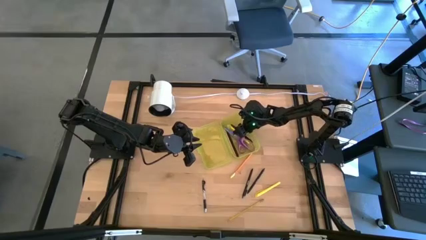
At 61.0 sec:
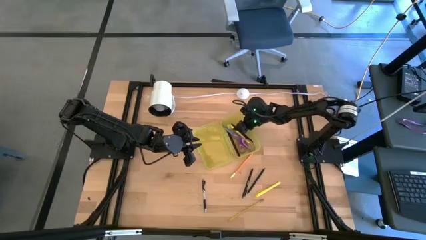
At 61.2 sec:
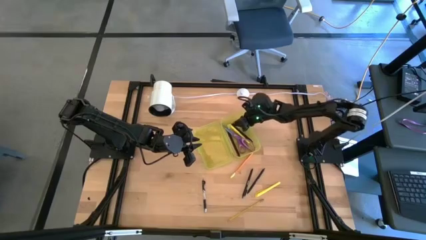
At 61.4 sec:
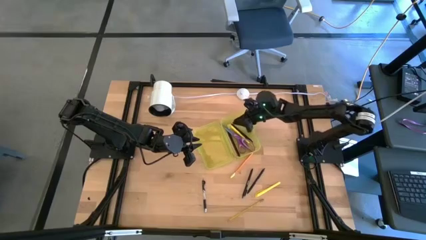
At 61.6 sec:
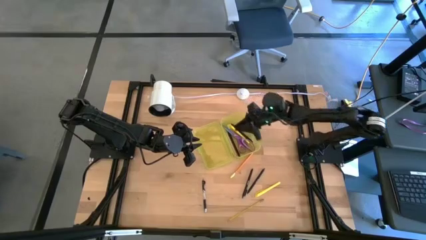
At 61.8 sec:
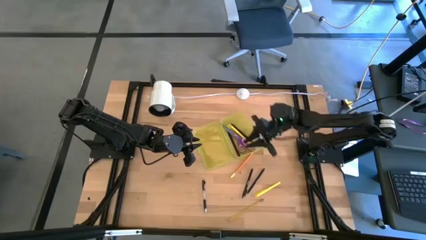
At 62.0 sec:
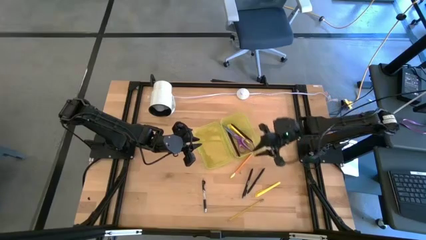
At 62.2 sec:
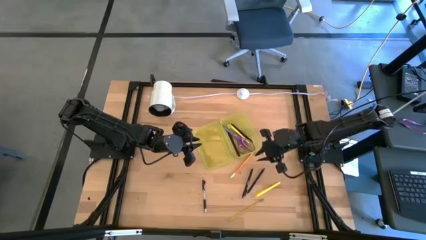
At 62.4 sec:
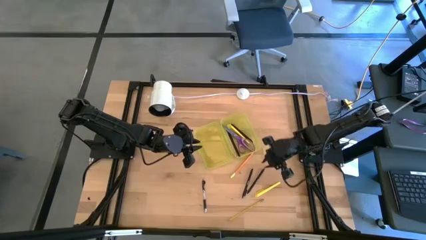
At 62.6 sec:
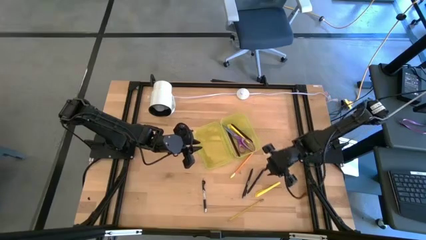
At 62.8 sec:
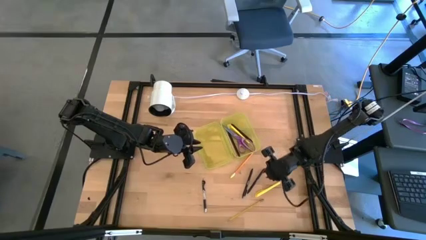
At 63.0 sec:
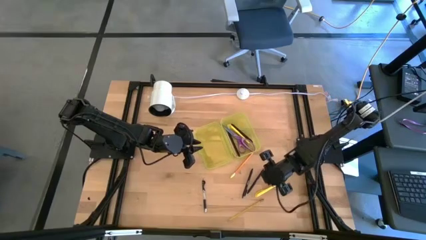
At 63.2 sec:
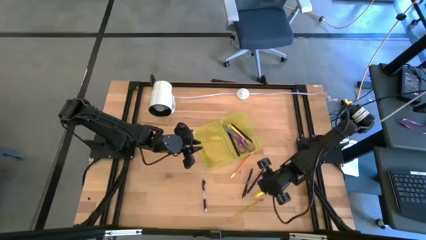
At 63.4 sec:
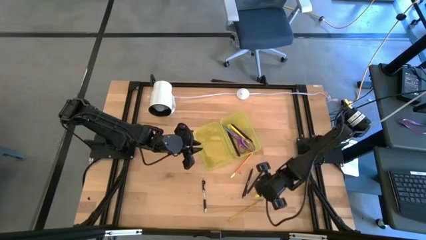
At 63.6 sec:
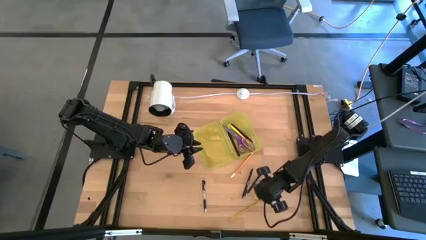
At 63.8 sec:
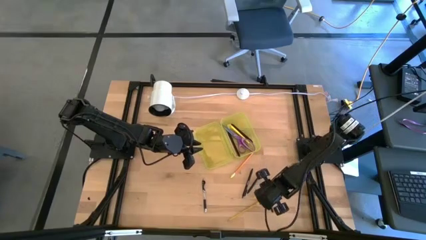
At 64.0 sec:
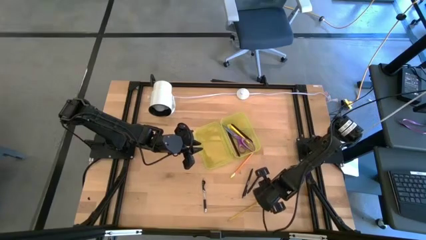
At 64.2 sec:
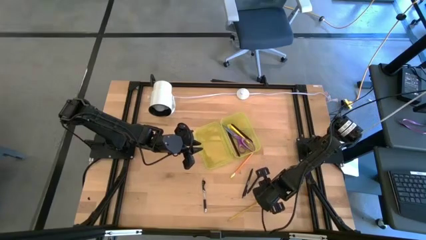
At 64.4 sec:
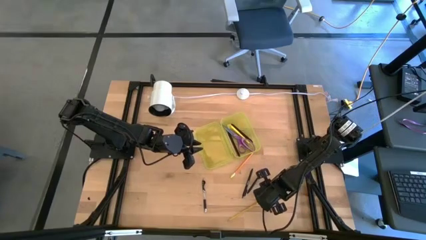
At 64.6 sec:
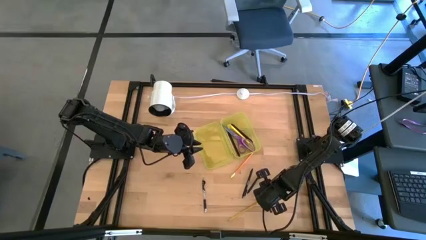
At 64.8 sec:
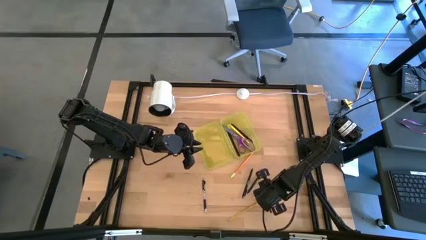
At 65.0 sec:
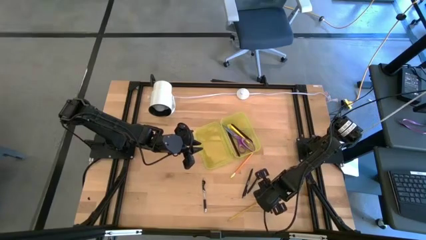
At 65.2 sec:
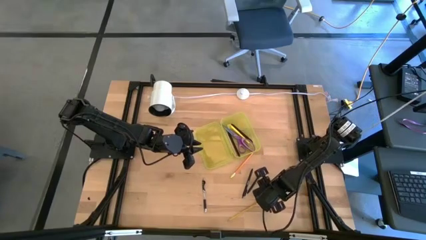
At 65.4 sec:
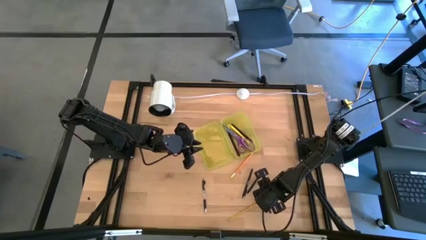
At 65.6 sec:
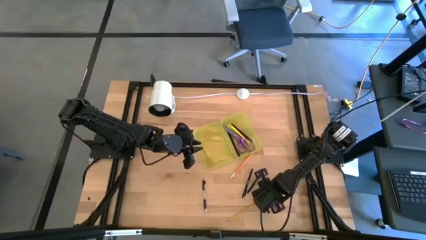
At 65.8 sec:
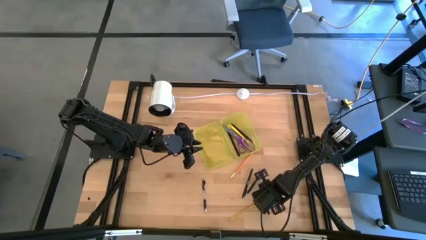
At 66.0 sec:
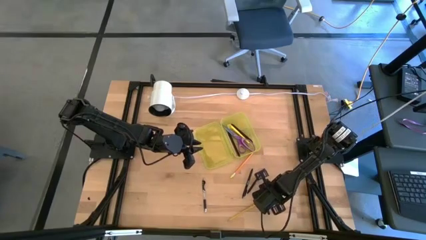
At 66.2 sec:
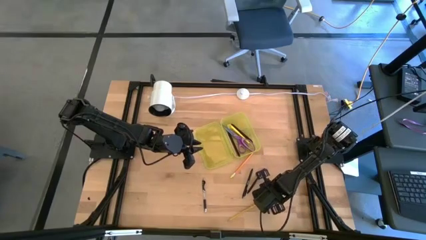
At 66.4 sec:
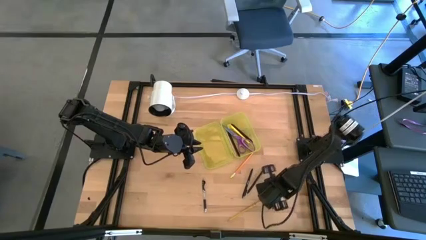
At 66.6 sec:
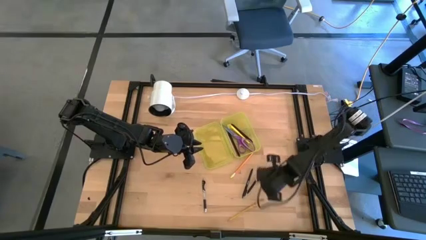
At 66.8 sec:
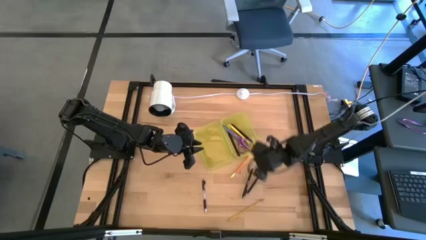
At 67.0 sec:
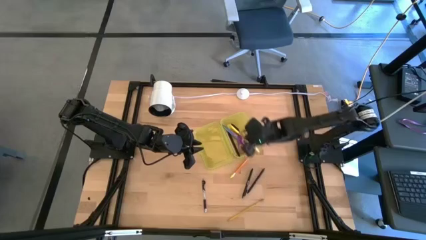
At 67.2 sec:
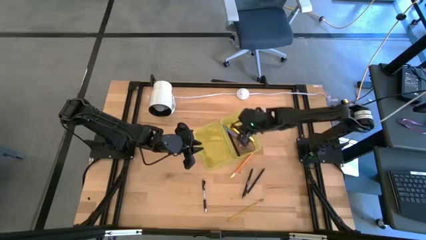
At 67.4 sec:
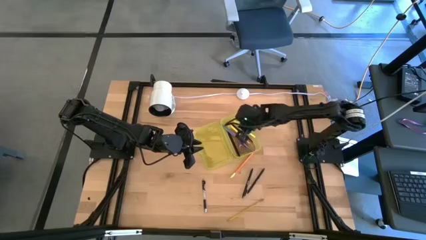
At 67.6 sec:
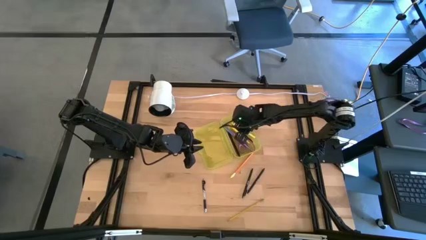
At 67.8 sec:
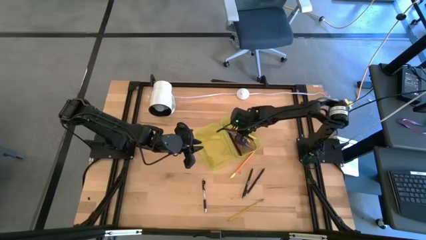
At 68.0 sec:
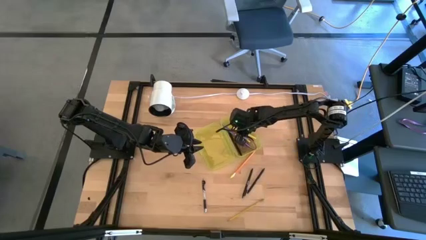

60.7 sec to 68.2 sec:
Task: Pick & place school supplies into a supply box
Put the yellow pen into the yellow supply box

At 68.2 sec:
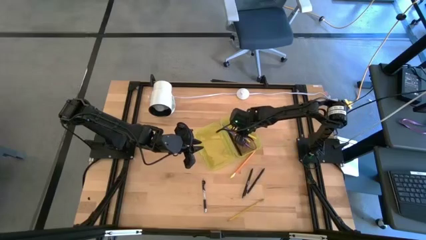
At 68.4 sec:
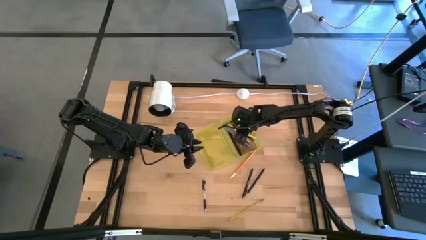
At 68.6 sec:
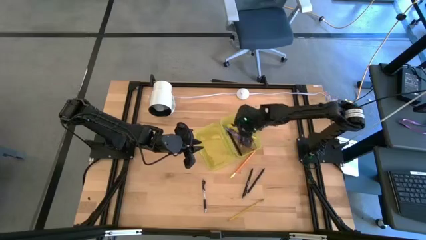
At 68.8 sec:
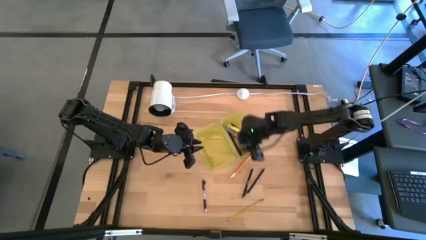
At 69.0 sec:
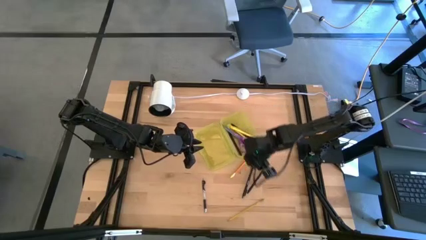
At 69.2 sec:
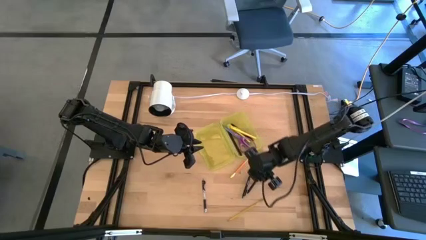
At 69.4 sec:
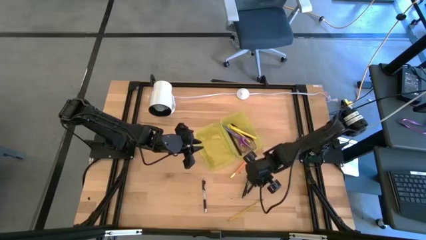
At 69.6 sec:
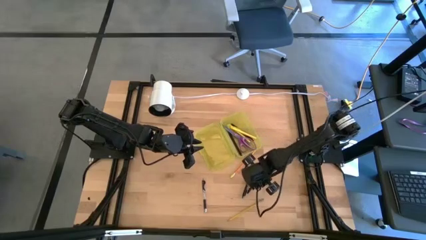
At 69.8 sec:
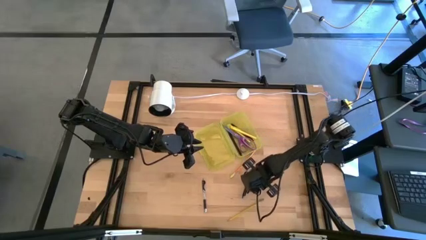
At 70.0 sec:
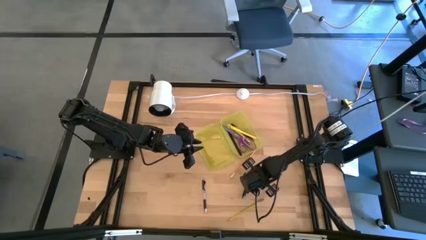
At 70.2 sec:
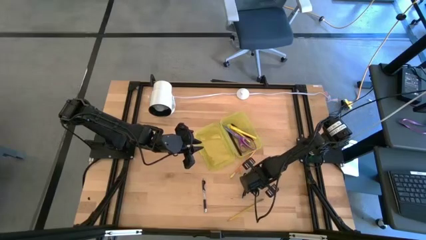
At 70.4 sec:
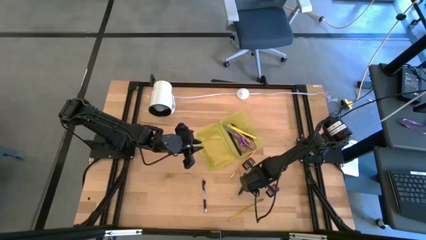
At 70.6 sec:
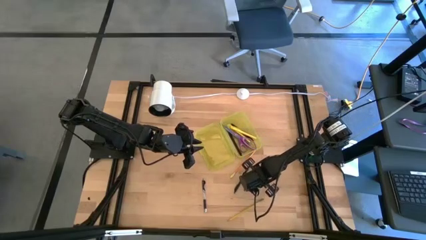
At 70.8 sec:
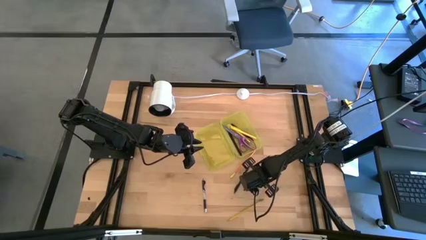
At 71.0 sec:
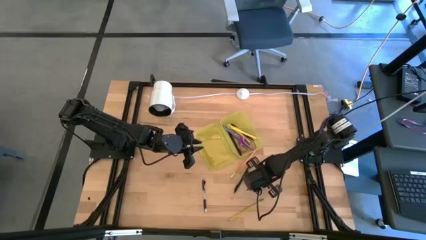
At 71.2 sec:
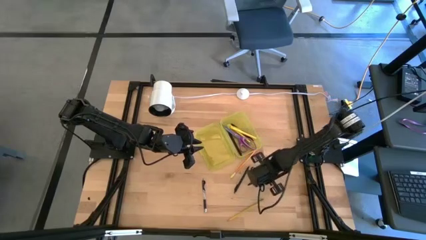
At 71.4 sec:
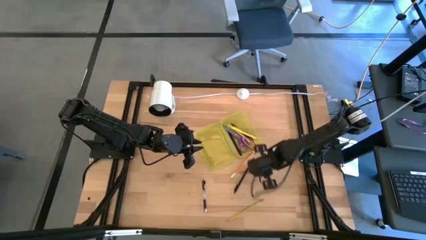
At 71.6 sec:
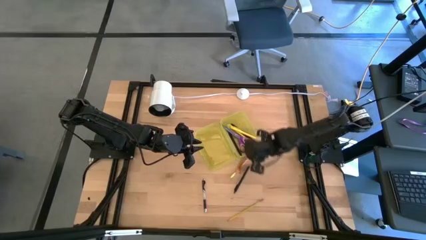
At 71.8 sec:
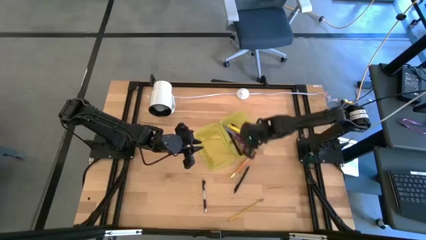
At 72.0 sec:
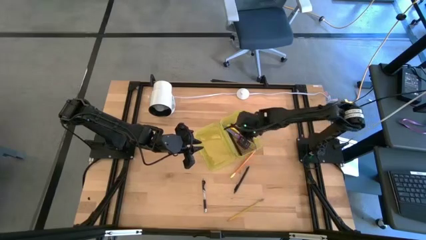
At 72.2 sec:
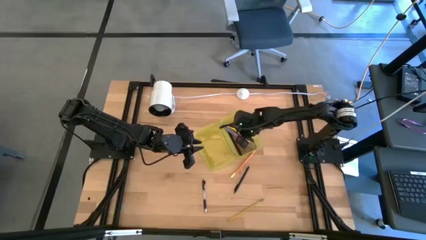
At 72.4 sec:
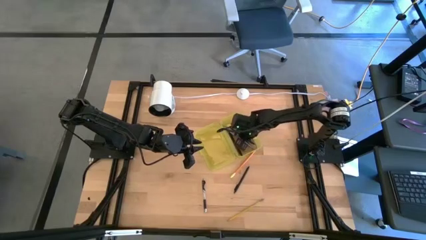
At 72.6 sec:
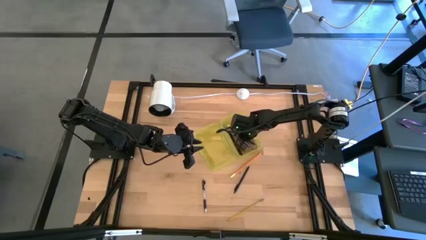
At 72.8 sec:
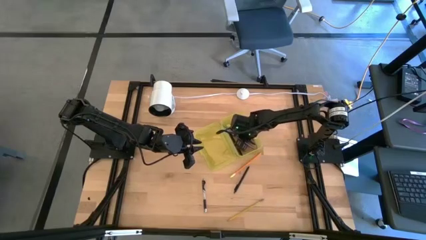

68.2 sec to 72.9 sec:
Put the black pen into the yellow supply box

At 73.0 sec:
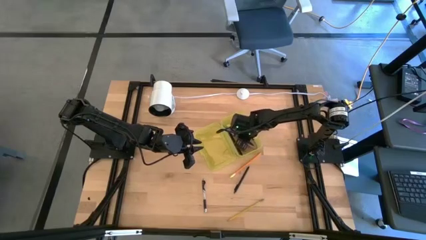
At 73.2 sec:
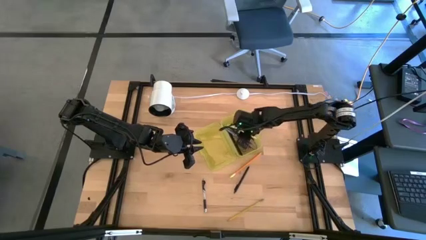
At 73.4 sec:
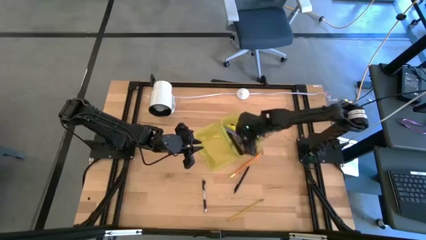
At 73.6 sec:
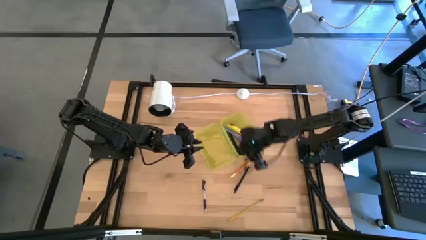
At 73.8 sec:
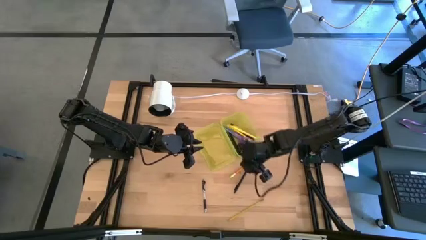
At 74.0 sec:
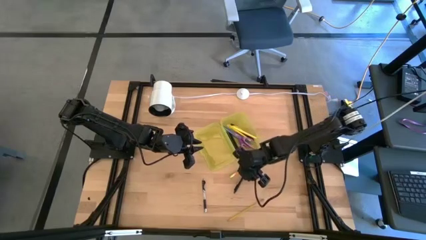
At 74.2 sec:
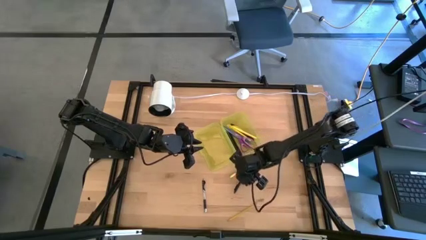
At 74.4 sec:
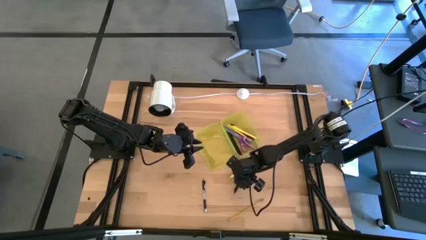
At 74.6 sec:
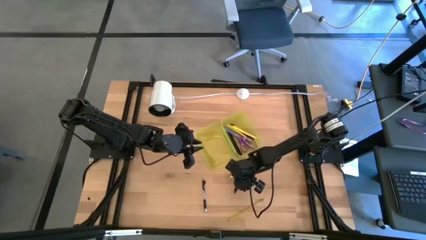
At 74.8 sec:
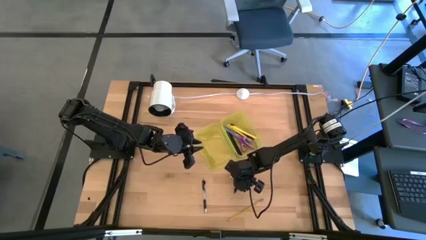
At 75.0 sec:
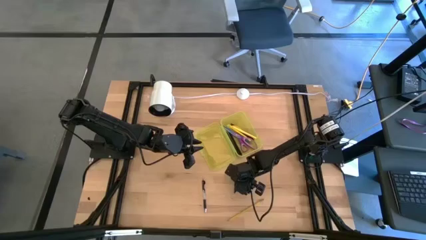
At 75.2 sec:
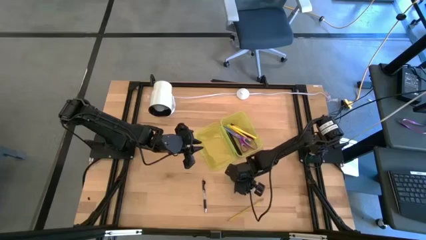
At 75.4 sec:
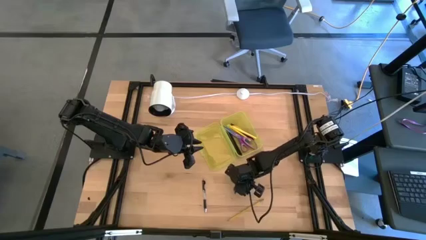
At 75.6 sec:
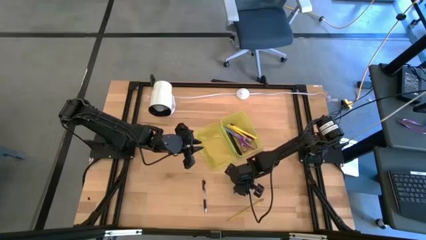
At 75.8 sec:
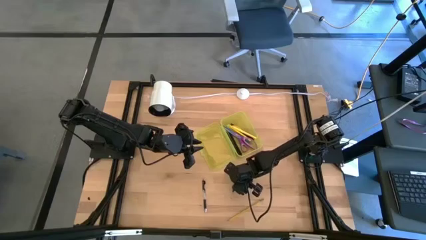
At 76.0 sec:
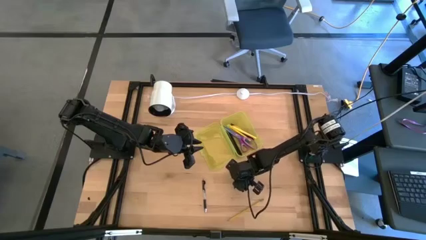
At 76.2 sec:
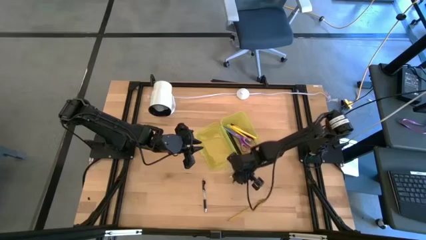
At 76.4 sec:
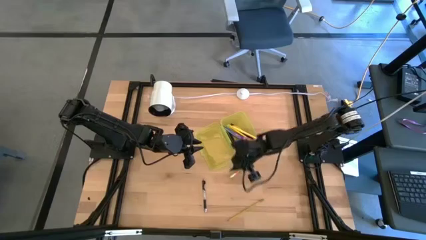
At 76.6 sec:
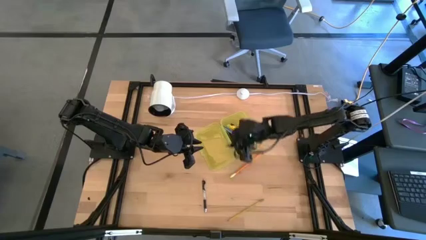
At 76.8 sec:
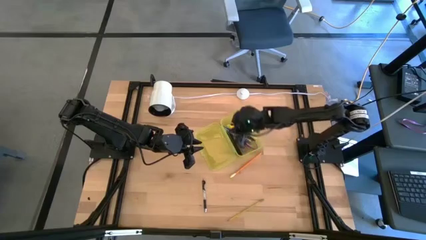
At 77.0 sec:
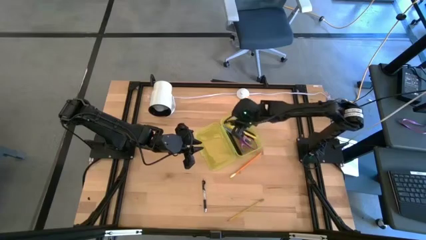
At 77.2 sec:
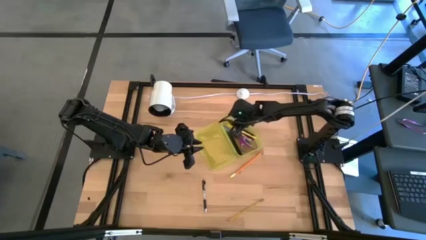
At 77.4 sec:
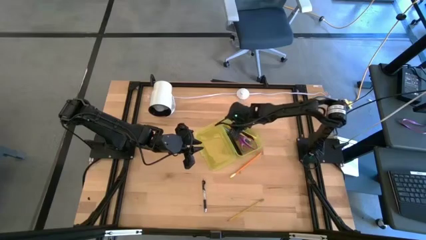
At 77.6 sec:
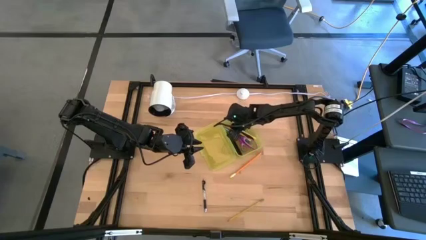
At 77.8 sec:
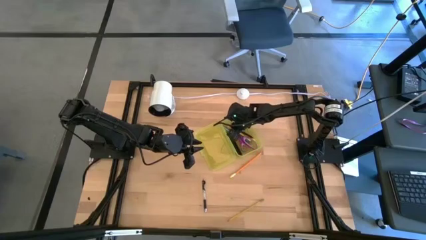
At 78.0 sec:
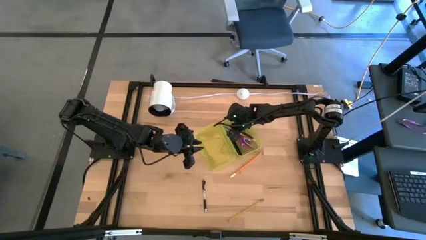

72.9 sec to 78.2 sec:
Put the right black pen into the yellow supply box
